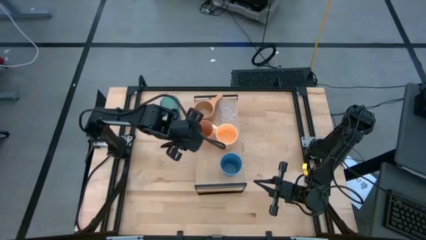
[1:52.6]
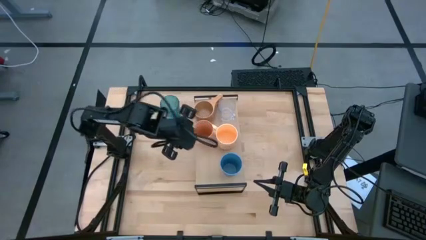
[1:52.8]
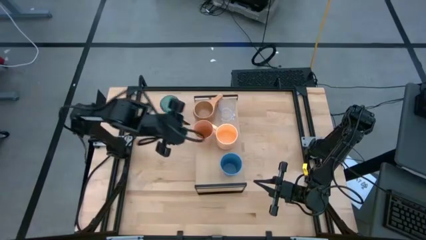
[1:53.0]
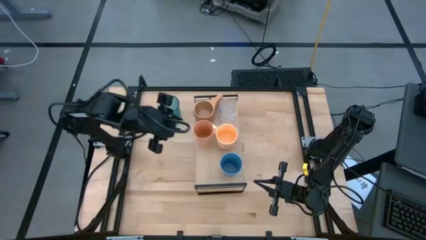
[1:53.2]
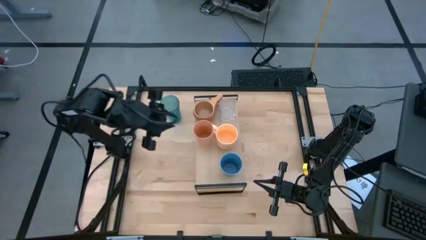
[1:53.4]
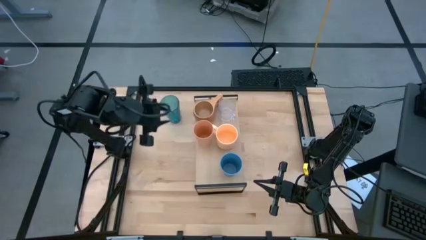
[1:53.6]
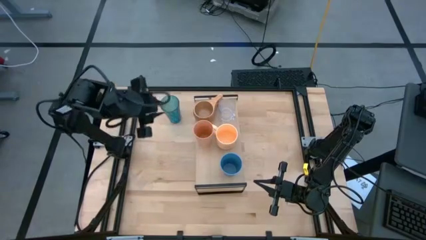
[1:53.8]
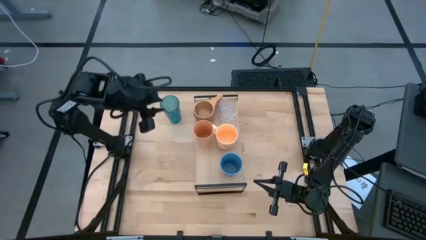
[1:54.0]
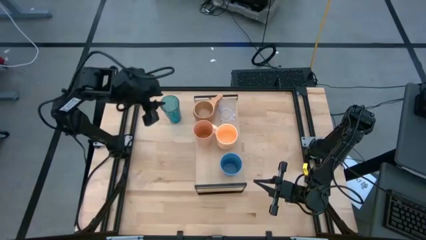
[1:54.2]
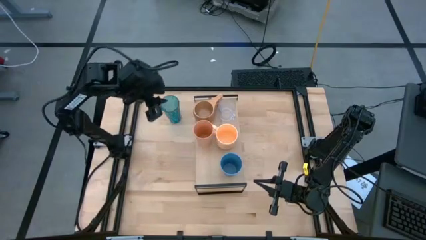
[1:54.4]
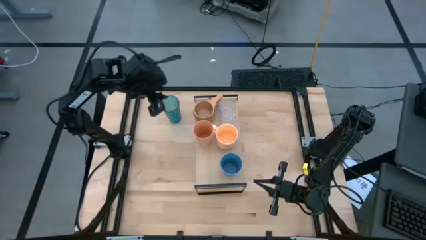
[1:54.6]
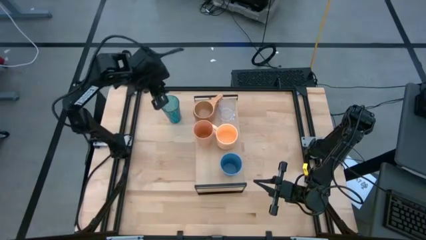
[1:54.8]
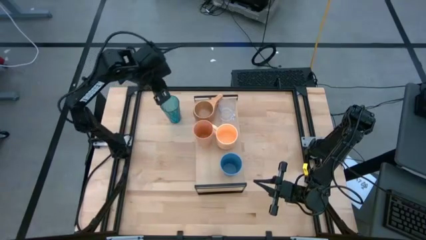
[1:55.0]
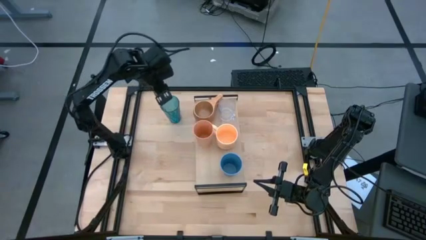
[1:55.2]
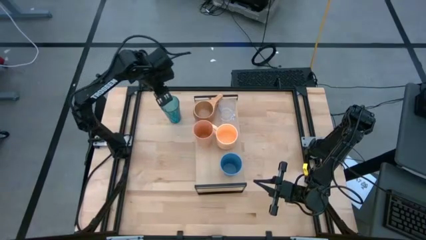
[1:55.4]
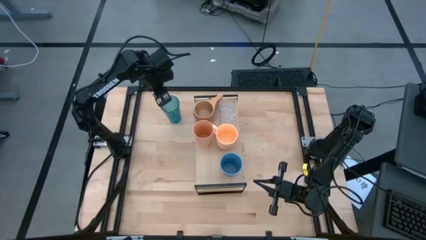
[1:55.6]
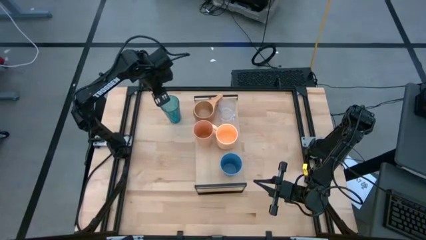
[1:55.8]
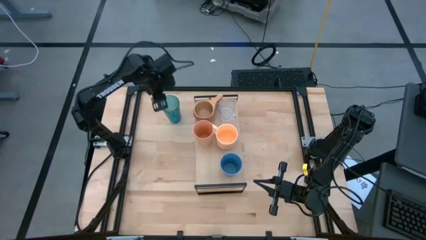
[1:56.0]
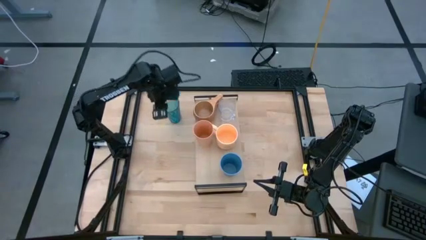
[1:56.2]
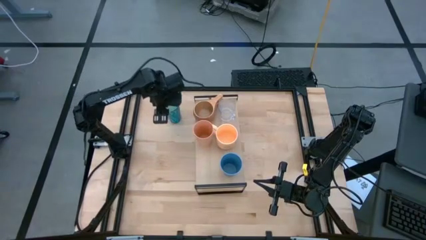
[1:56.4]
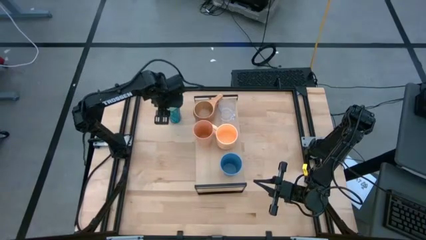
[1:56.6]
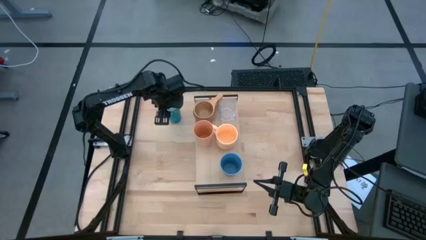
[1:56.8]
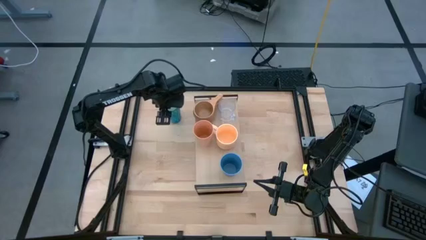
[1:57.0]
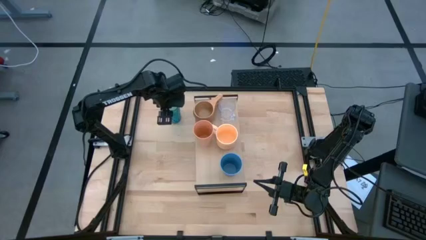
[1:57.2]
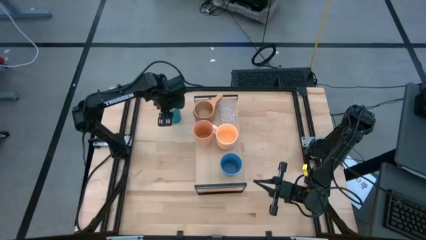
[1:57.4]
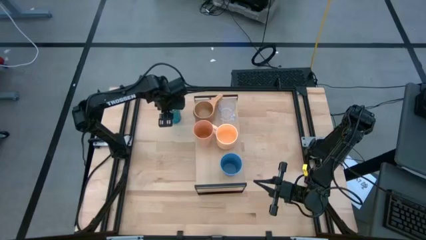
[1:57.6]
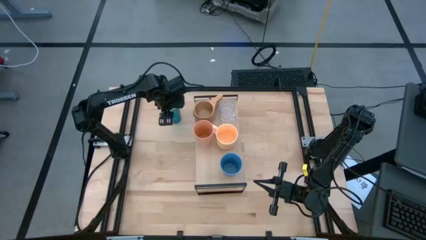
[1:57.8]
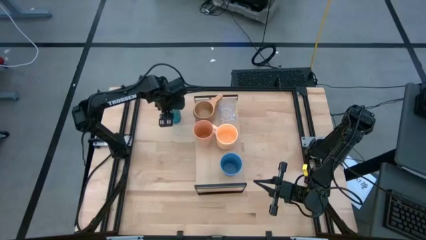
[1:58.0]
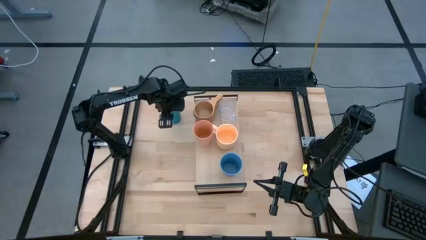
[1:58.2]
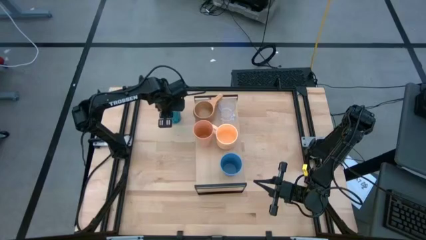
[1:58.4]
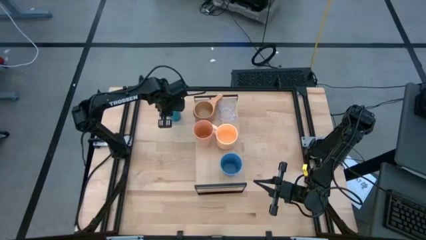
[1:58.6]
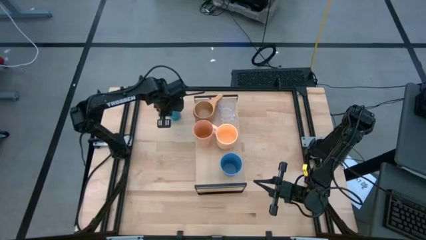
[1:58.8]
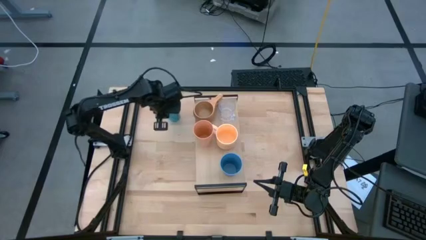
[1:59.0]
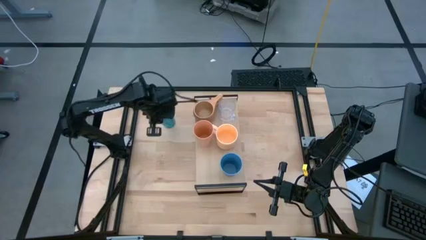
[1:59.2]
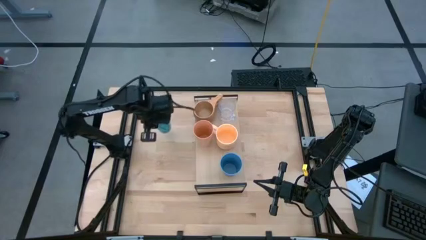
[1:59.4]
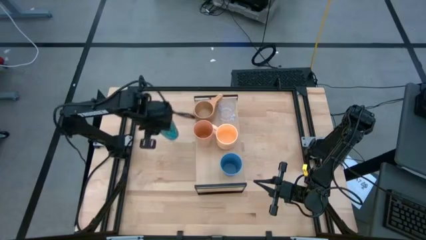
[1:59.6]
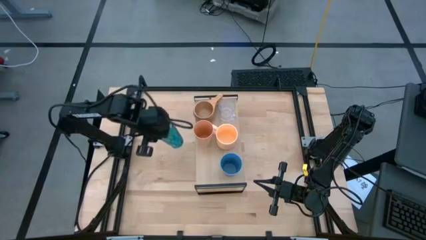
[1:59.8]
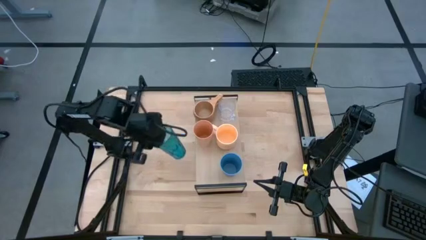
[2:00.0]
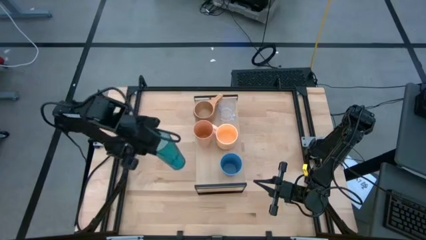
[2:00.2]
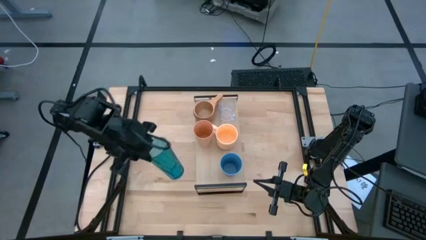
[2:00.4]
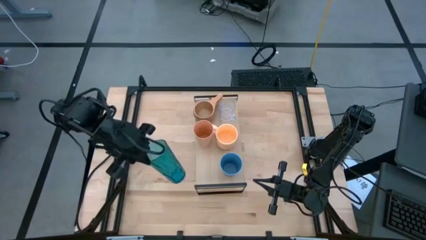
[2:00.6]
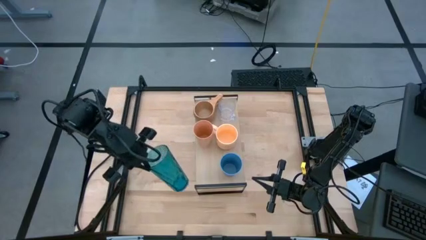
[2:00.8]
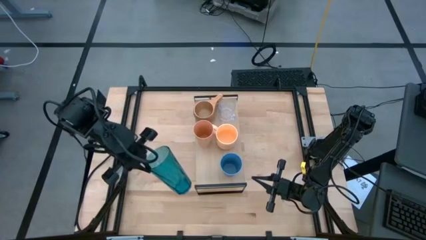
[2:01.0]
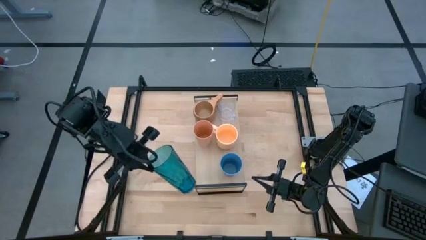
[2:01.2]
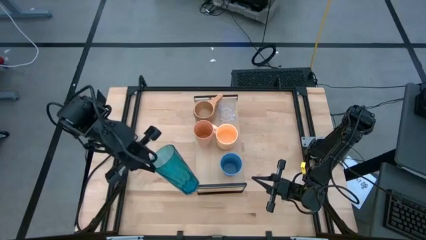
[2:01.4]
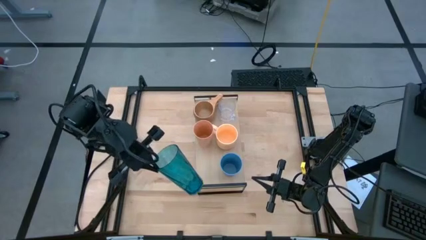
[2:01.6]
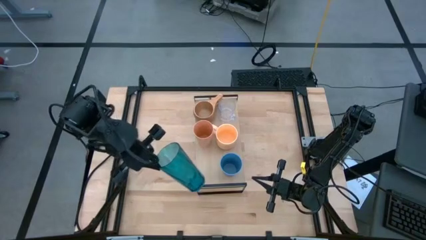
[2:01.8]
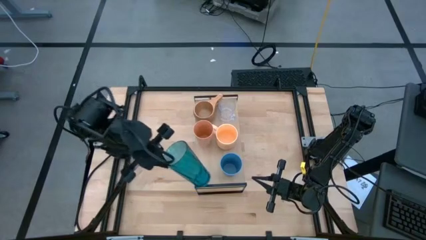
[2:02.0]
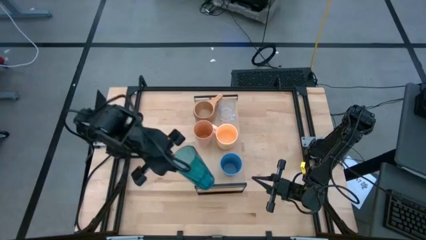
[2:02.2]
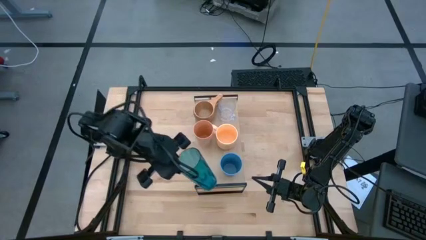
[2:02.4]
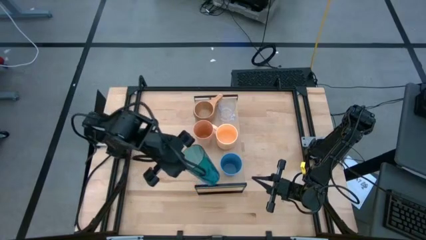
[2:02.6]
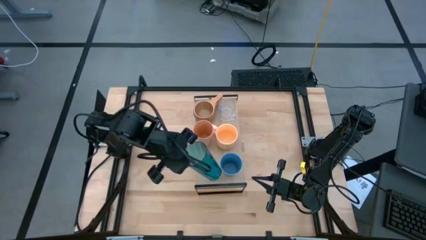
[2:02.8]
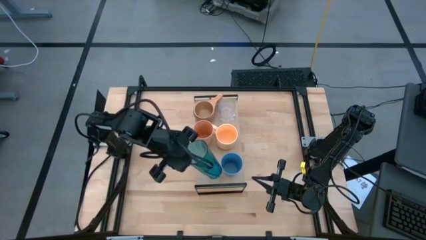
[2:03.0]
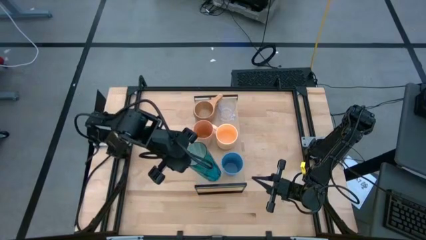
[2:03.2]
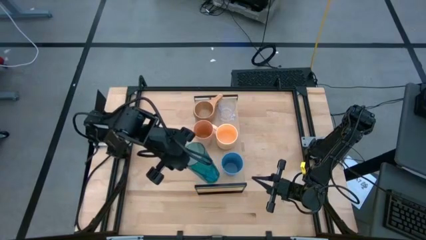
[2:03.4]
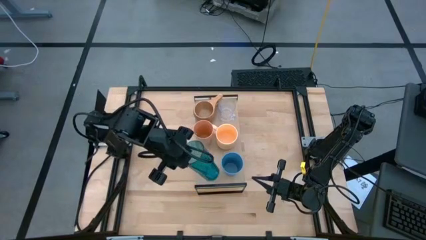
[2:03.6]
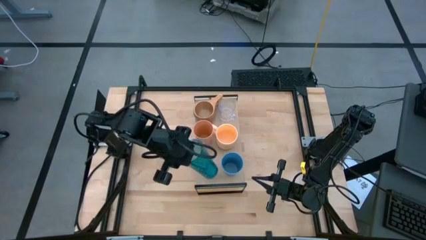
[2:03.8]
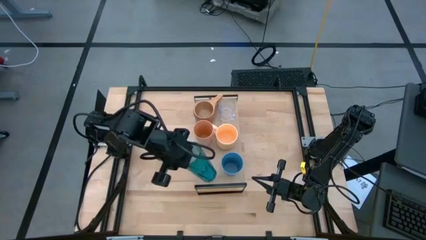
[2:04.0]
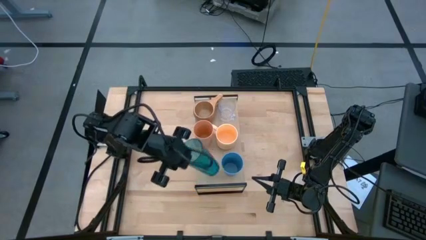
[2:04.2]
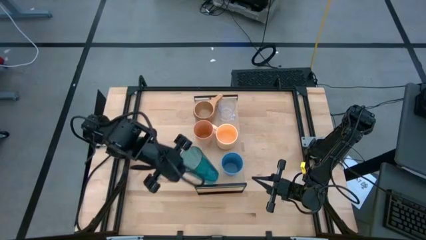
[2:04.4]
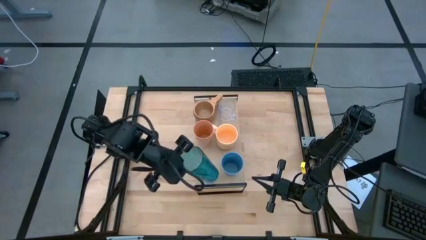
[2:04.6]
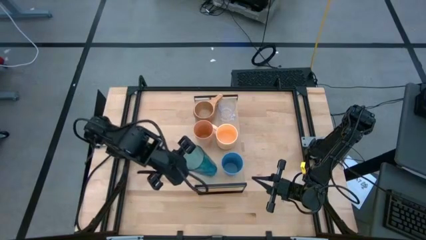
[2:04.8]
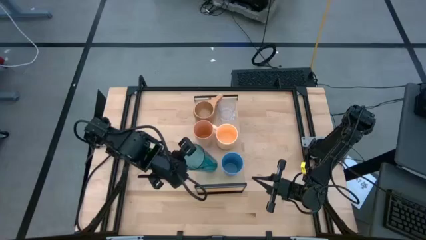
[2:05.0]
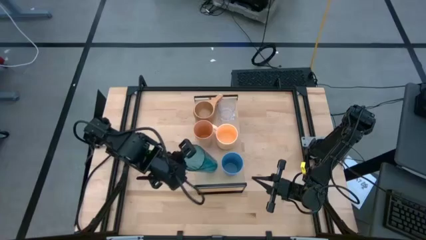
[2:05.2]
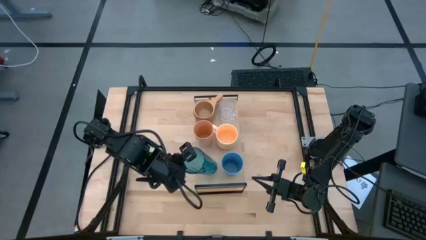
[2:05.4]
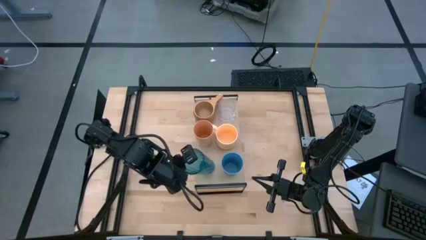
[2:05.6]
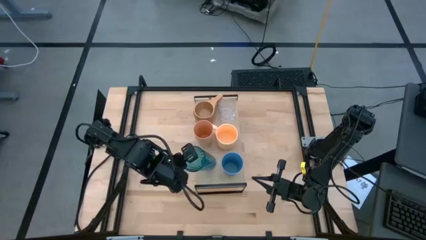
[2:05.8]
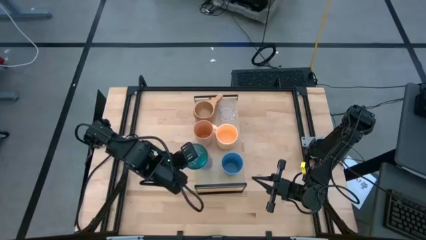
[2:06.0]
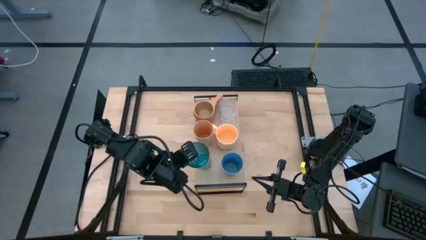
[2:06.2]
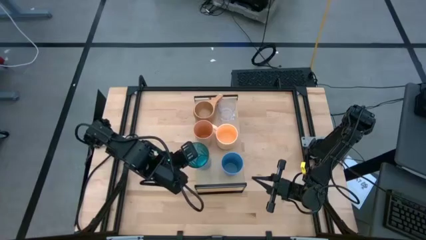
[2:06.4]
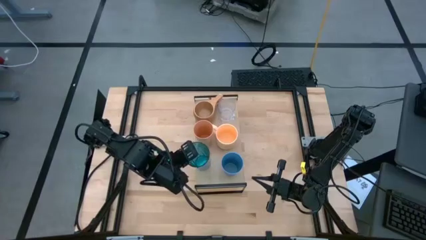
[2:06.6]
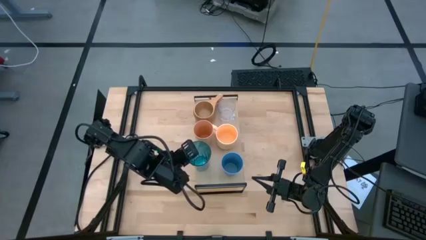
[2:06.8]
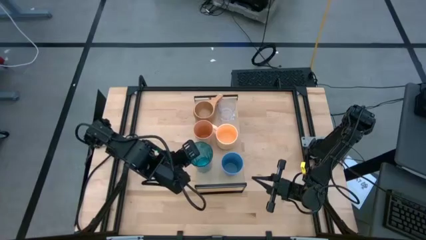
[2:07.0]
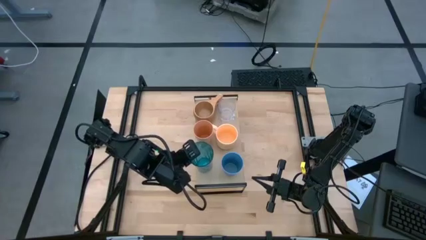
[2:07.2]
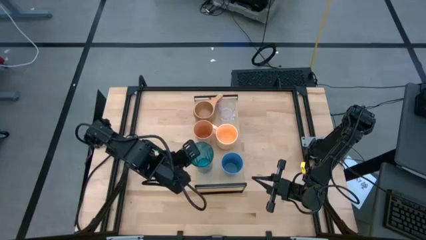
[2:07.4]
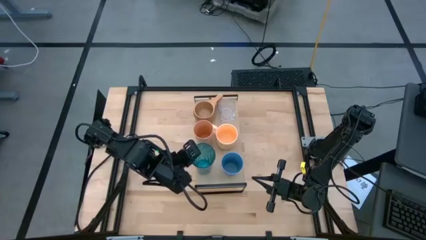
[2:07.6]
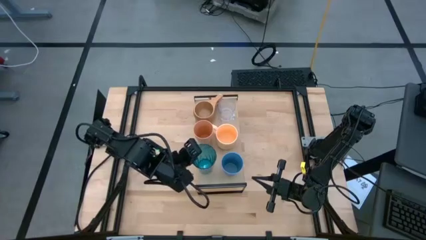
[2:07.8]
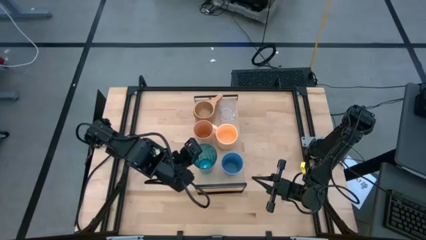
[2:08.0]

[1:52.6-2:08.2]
Task: Stack small to large cups/mugs on shelf
Put the blue cup on the shelf
